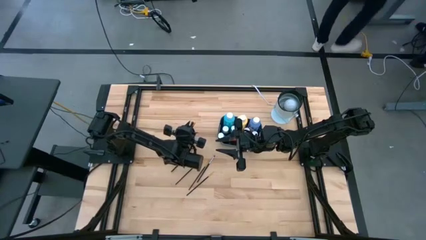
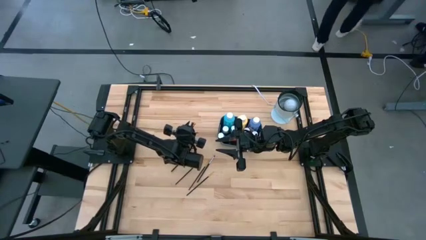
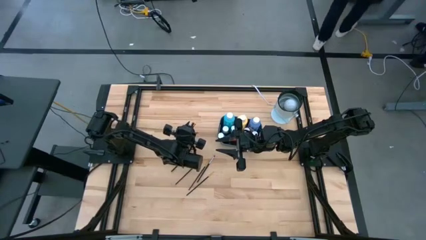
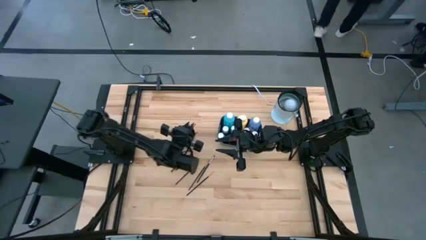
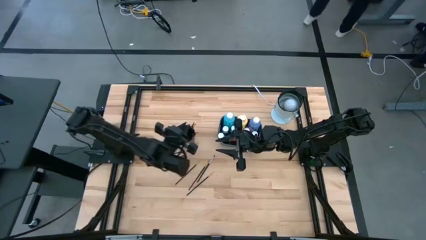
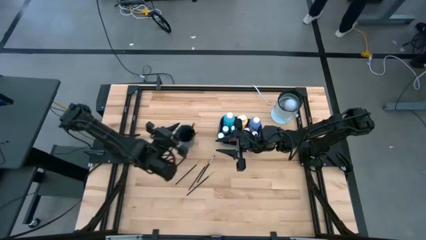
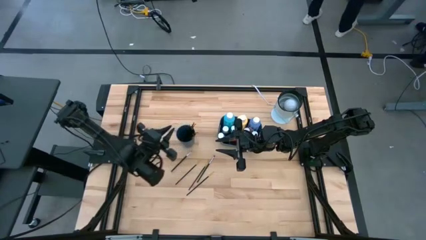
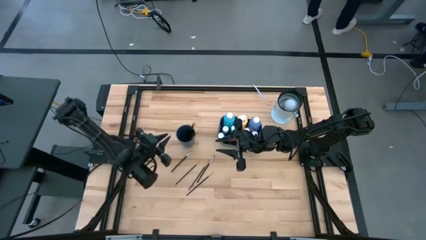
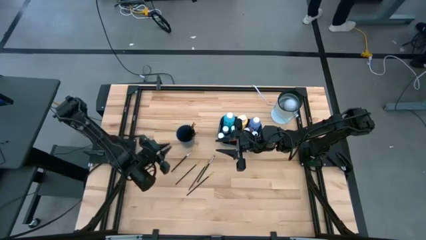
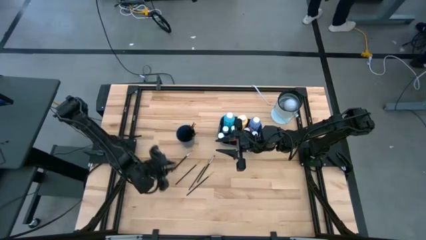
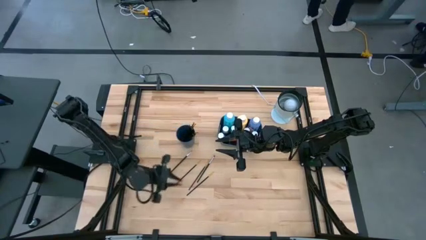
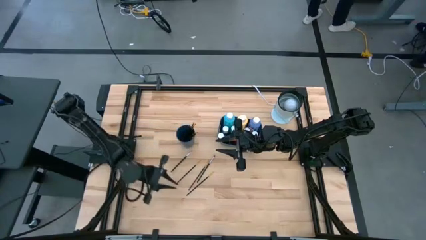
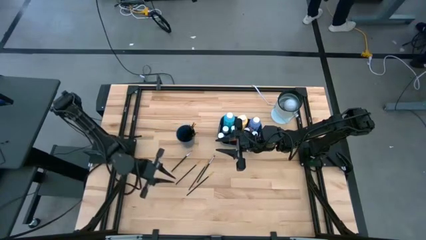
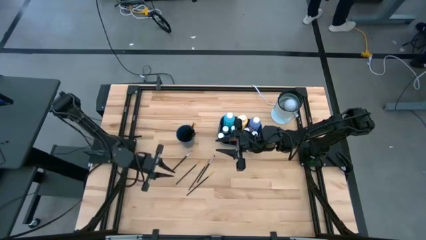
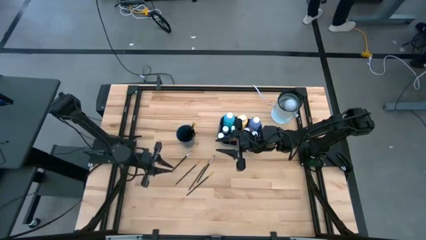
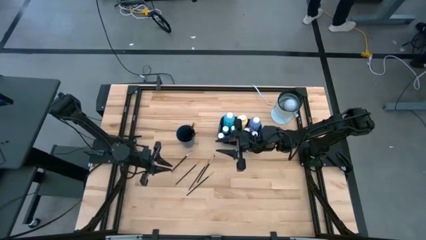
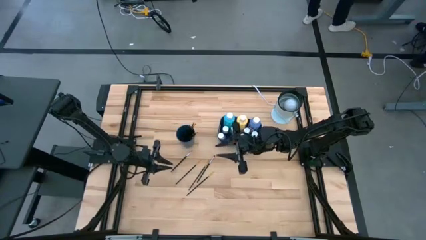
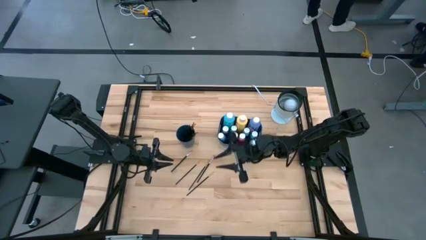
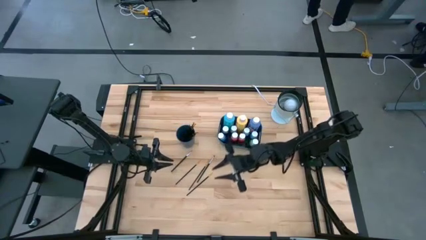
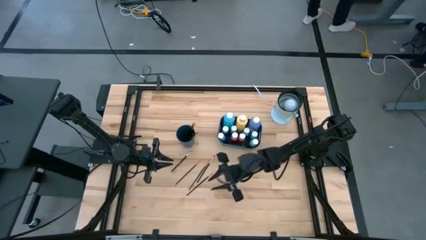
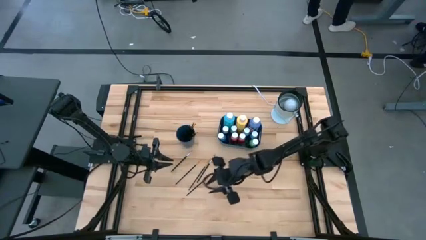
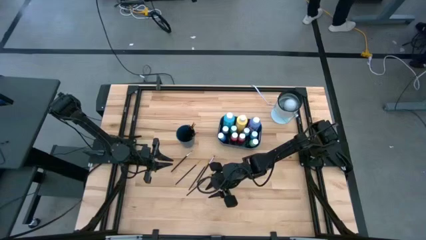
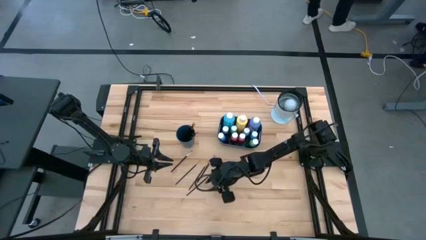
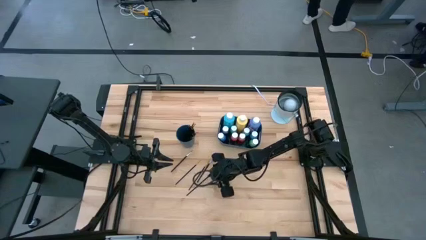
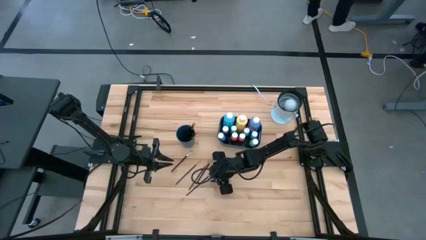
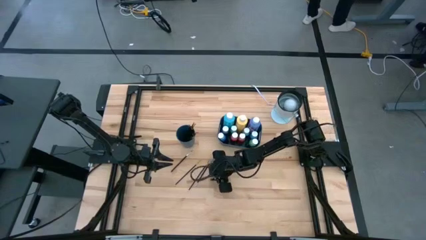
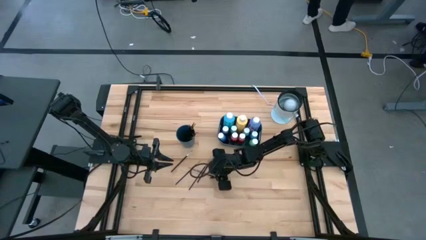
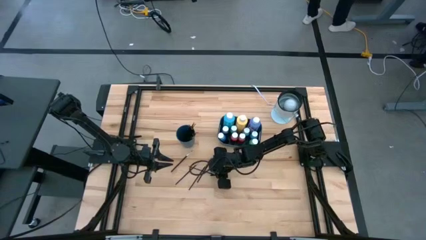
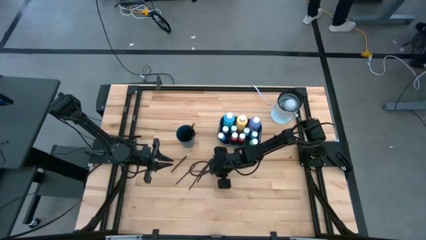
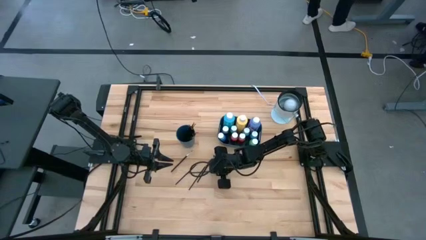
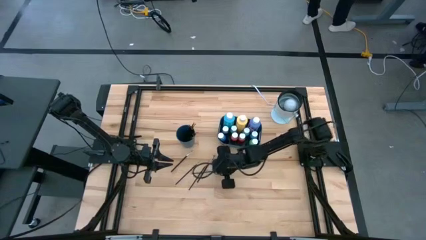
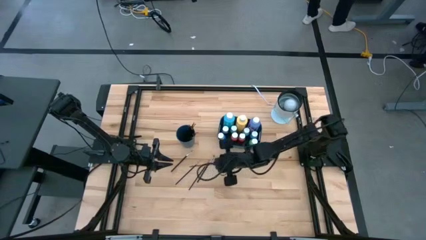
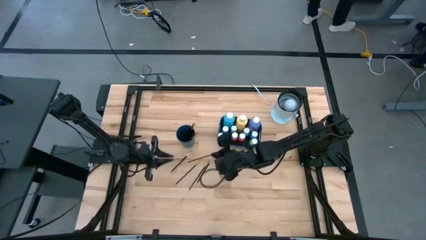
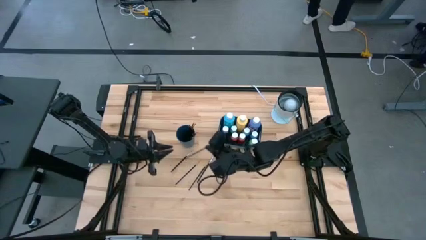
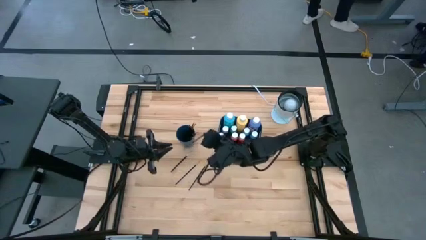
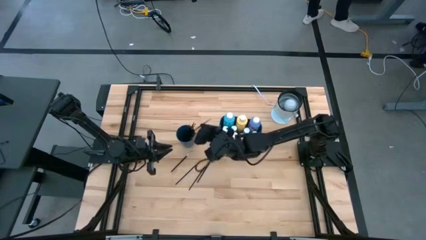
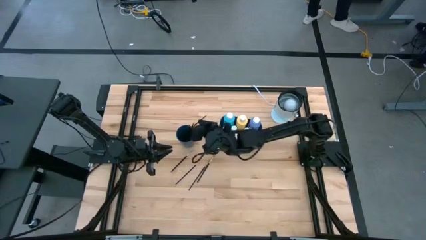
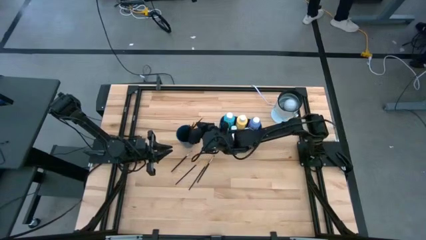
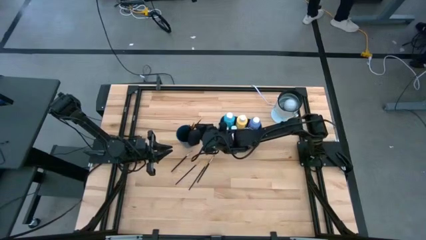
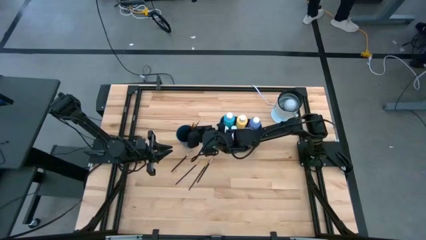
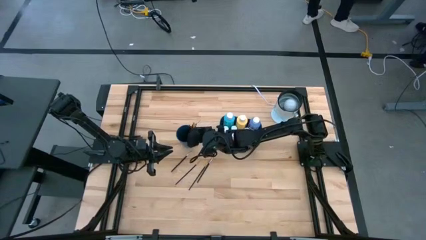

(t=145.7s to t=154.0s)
Task: Pick & Place Paint Supplies
Put the gold paintbrush into the blue cup

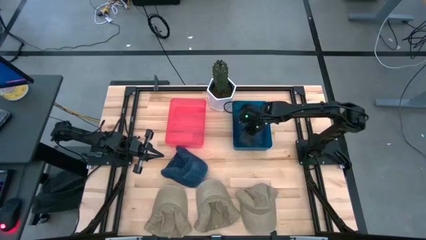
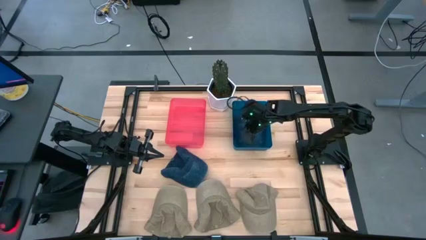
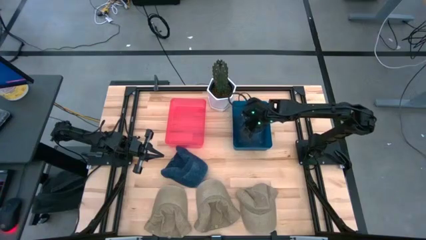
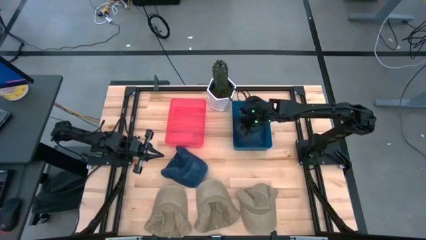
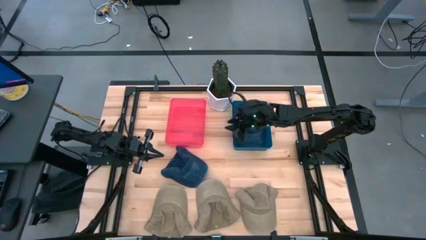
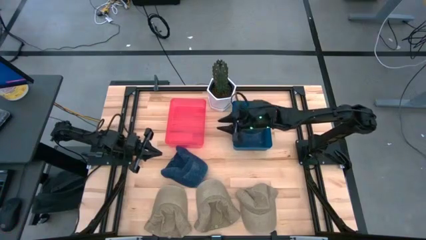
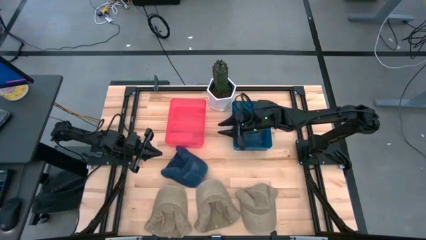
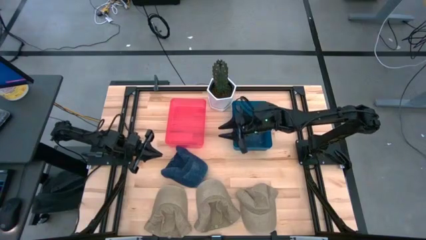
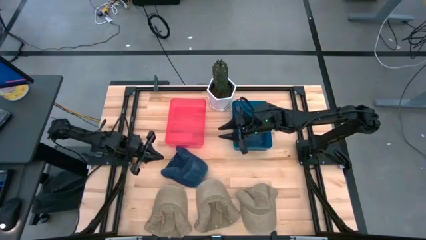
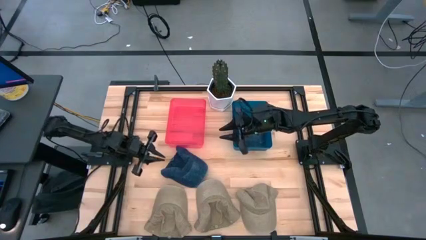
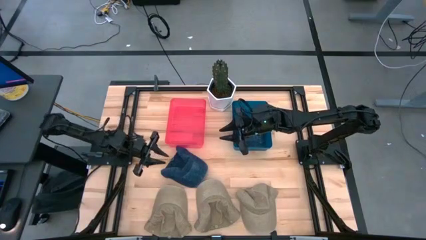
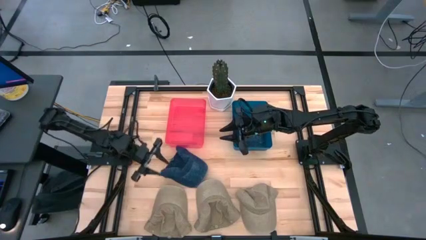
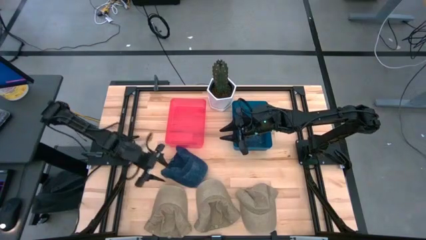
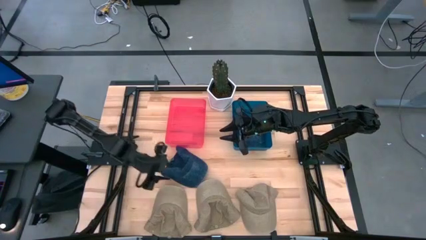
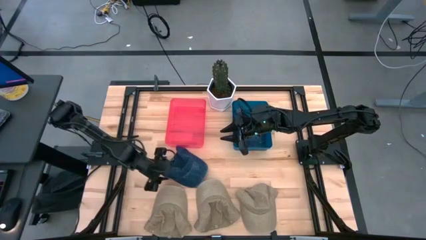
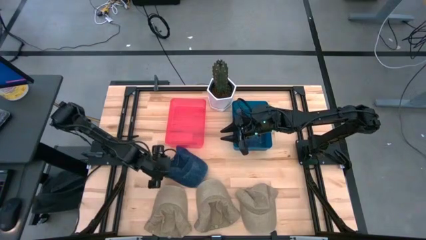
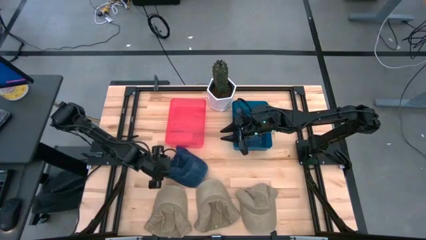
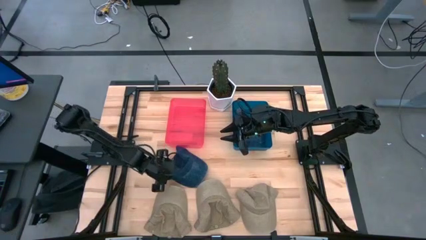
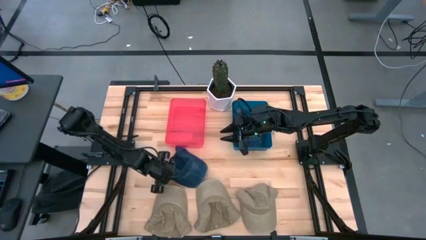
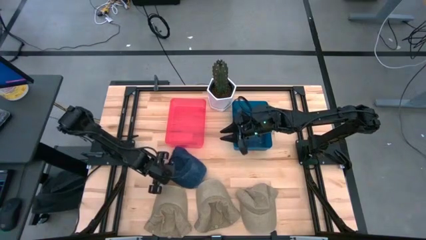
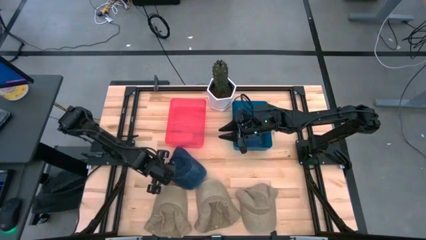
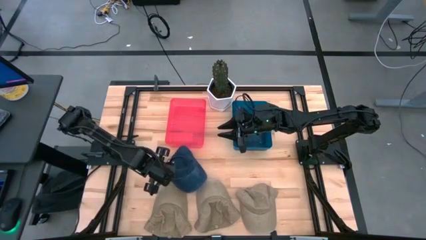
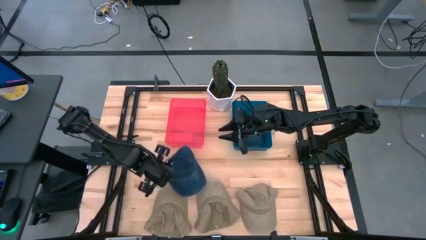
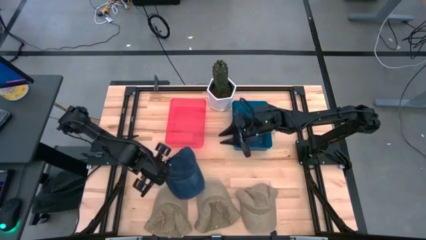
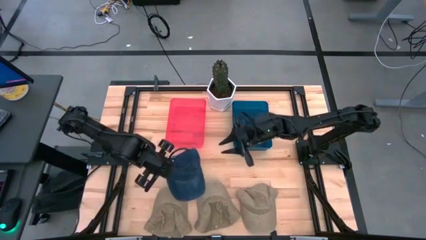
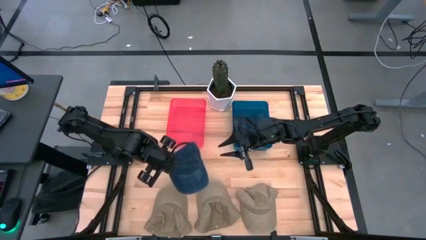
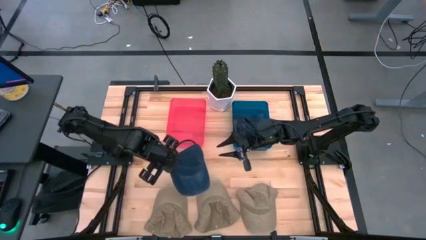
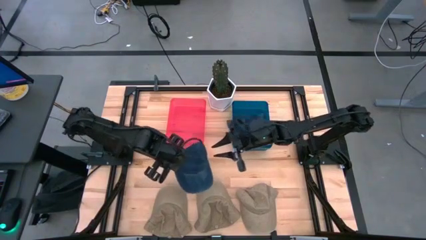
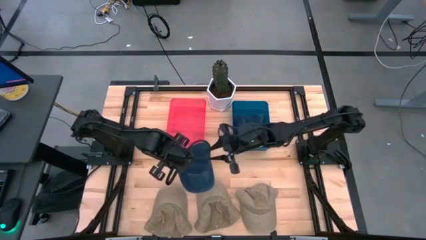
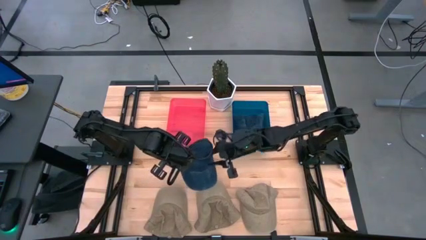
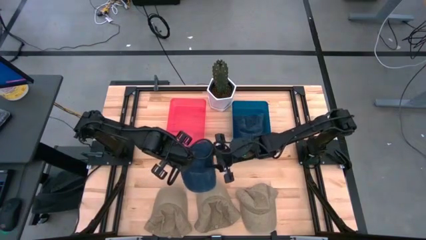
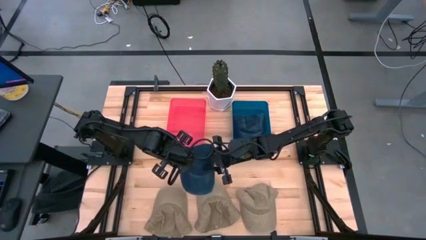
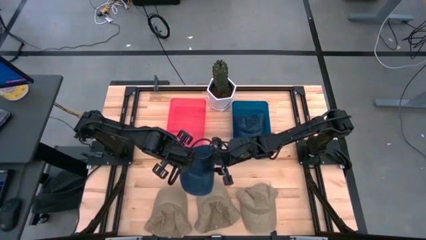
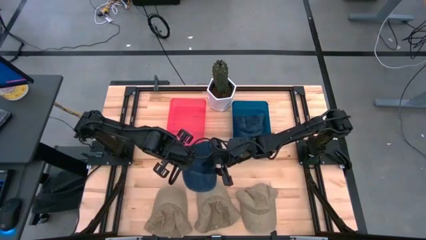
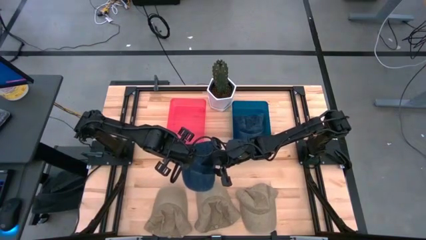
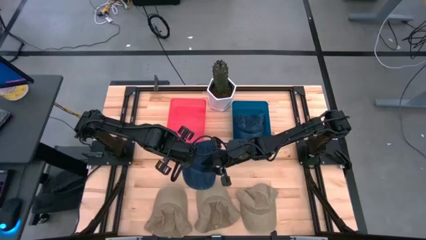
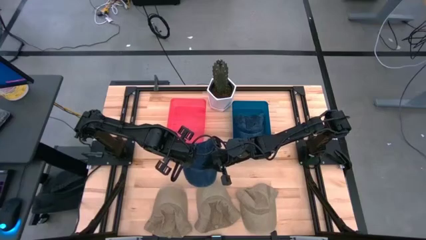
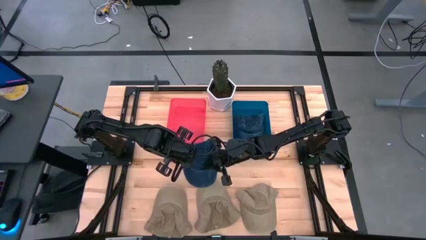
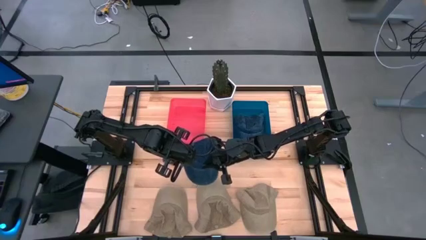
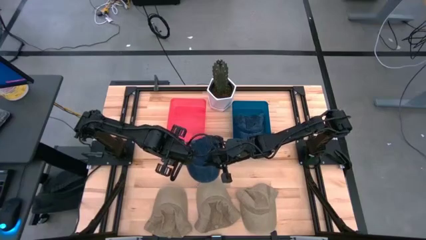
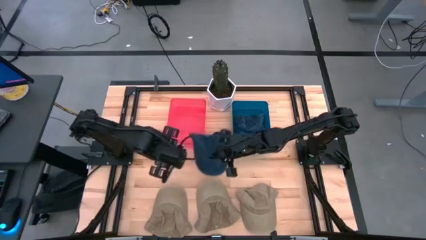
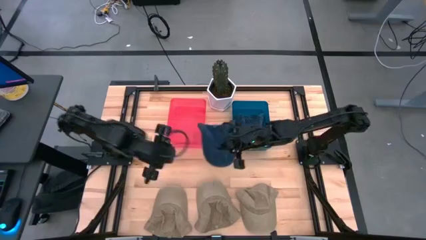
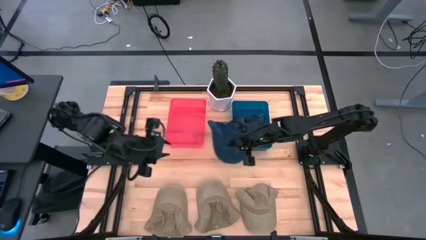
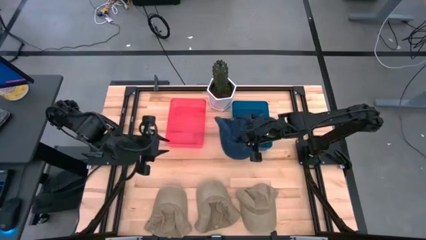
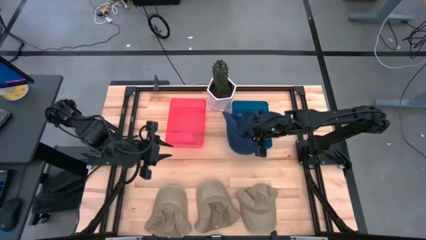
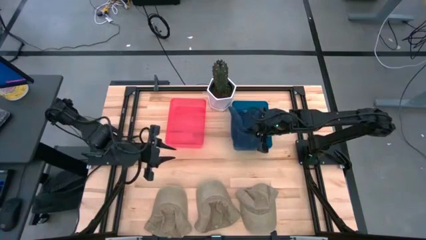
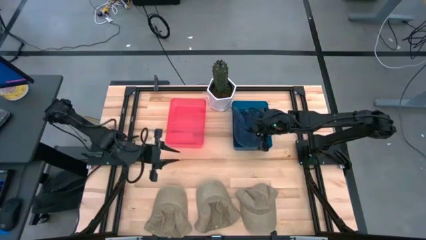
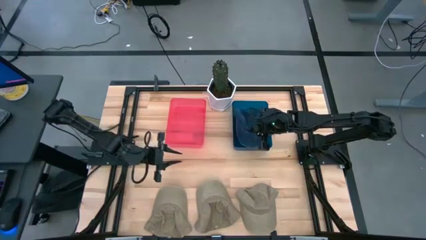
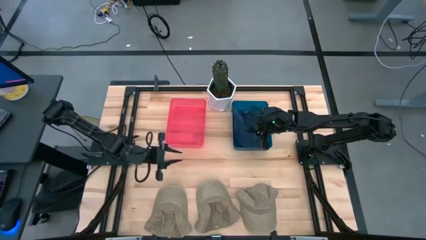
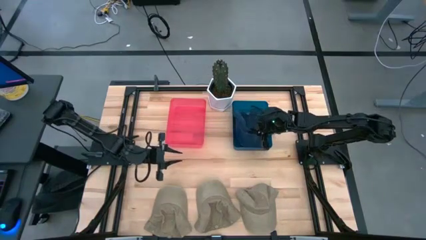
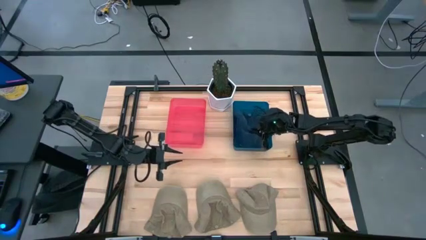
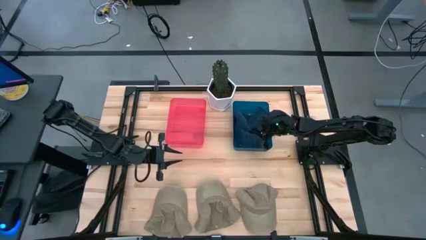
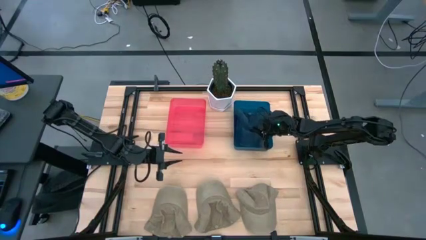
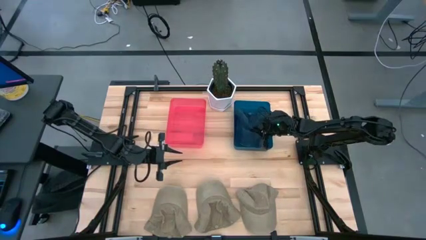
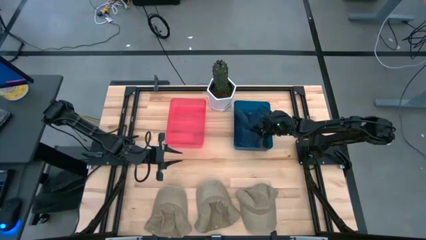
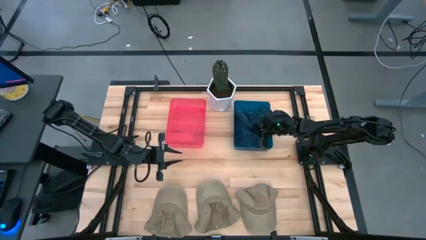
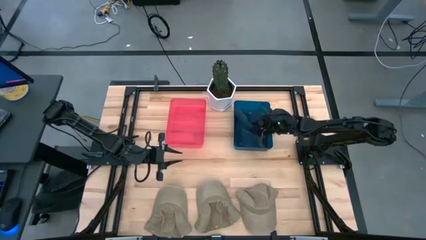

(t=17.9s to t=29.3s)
Task: Pick & Place hat
Put the blue cap into the blue bin
